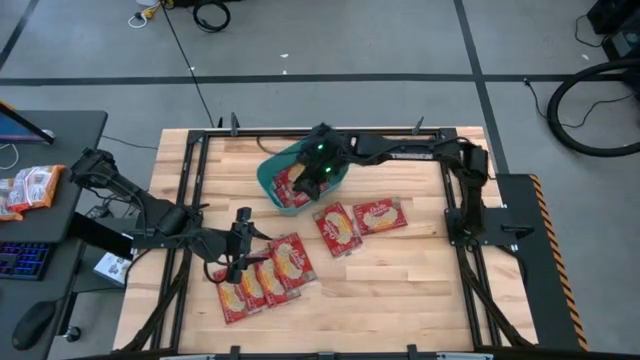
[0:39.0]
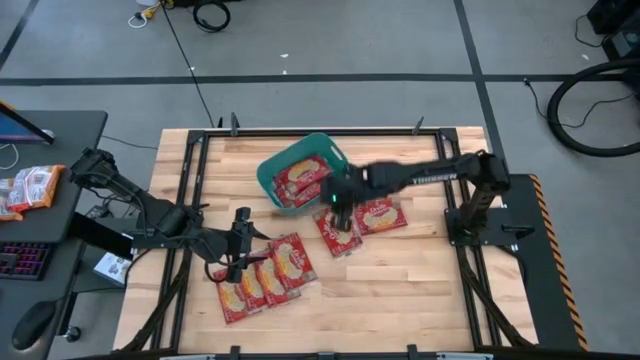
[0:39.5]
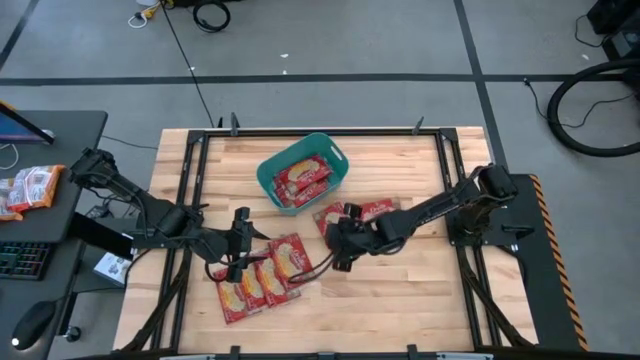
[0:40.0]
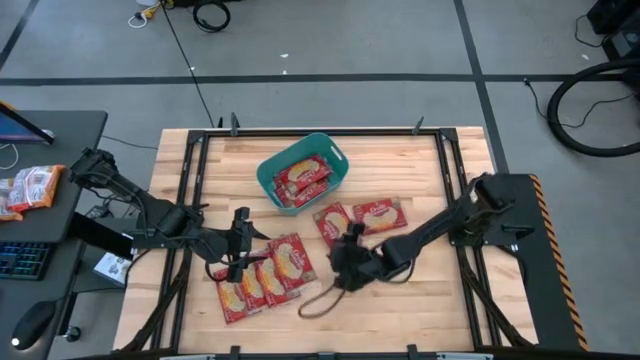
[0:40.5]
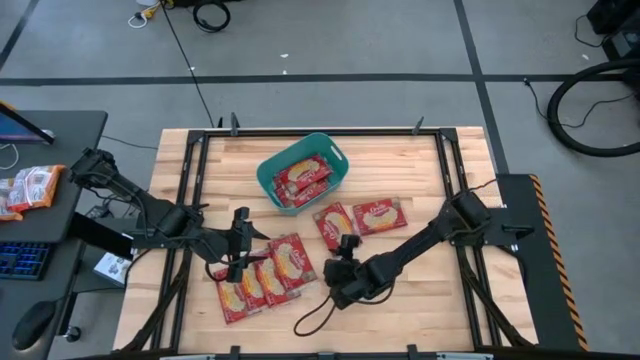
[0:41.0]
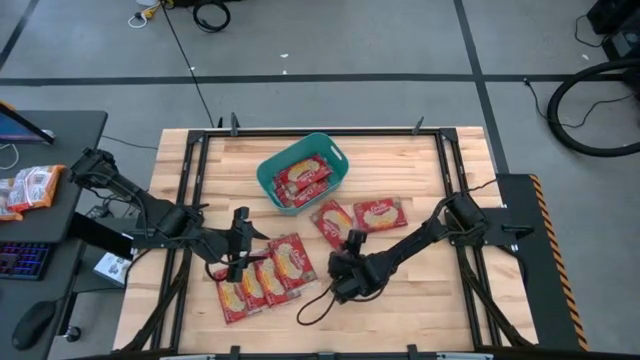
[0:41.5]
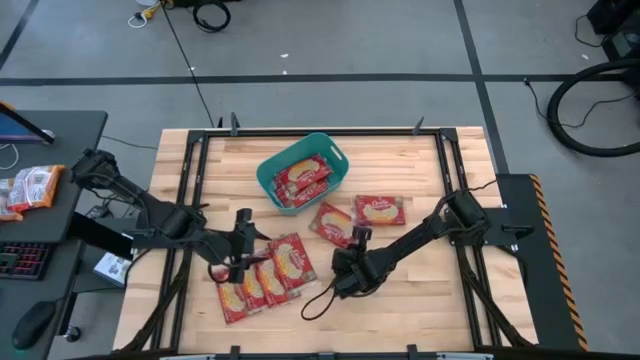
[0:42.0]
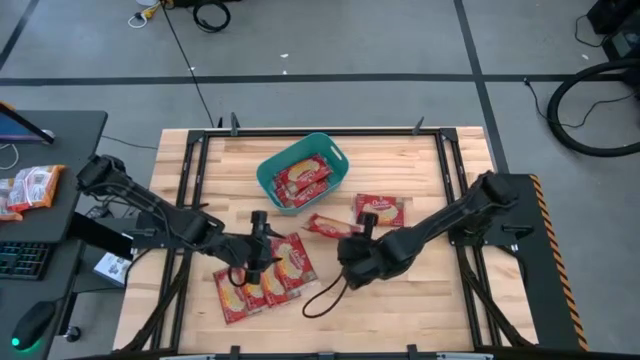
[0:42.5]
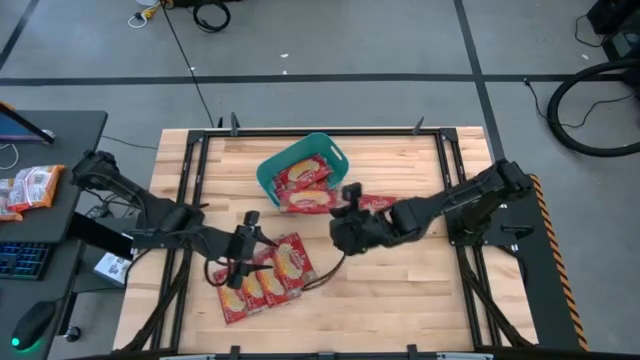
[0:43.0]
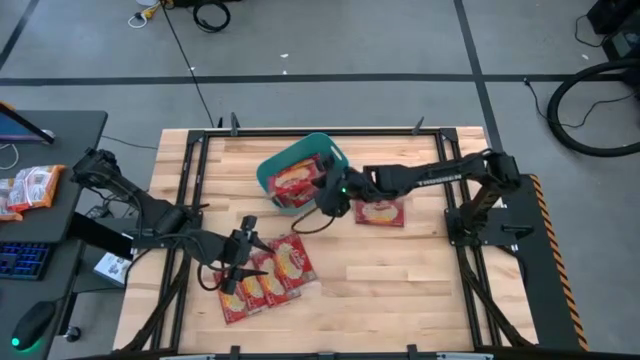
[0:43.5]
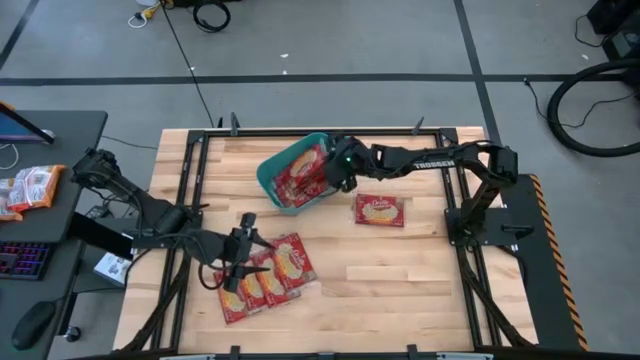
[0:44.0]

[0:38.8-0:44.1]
Task: Sort popcorn bags into baskets
Put the red popcorn bag into the green bin

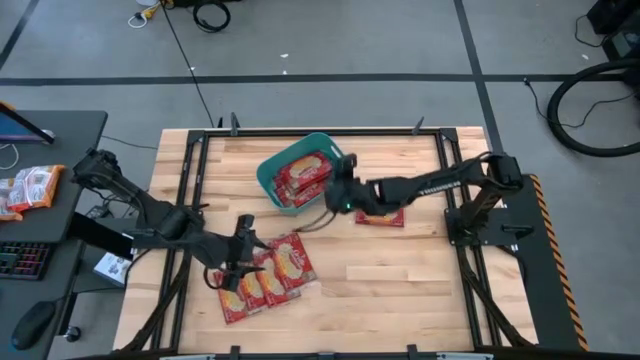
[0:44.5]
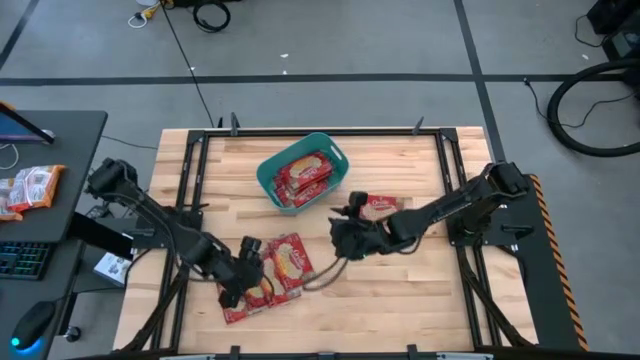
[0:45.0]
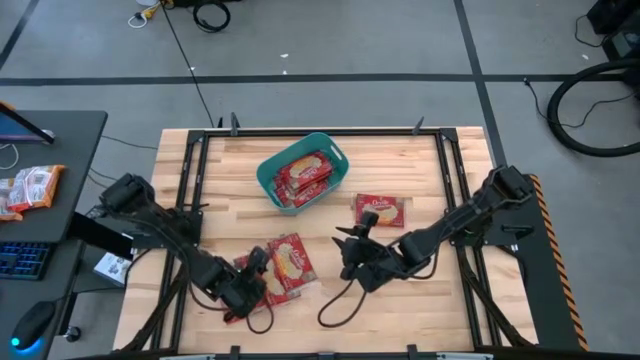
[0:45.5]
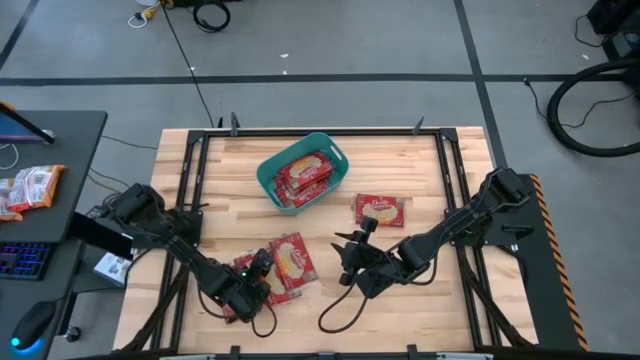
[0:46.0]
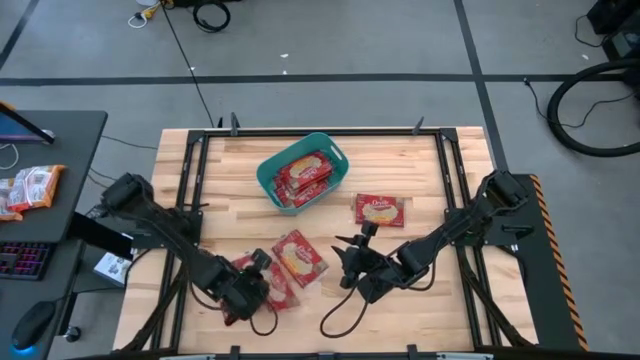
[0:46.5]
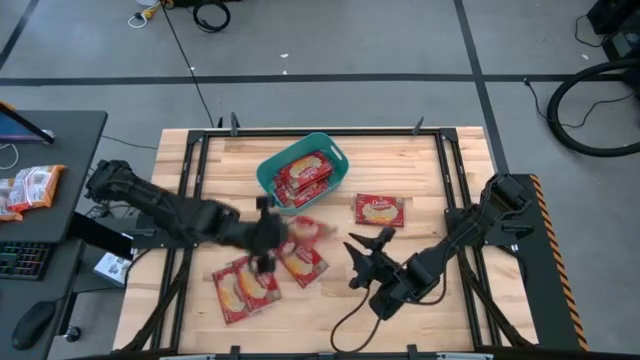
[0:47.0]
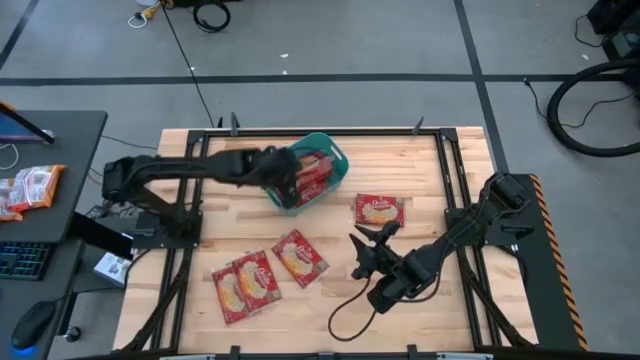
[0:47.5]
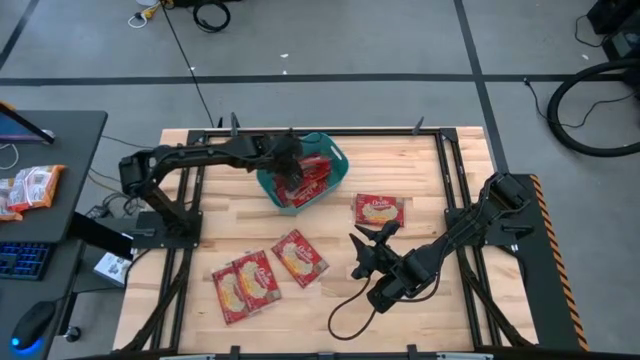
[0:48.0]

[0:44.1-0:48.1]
Put the red popcorn bag into the green bin

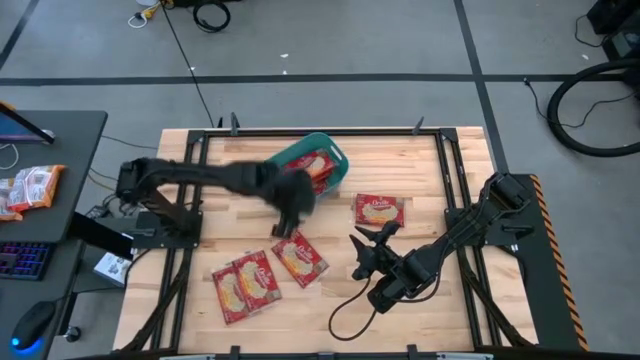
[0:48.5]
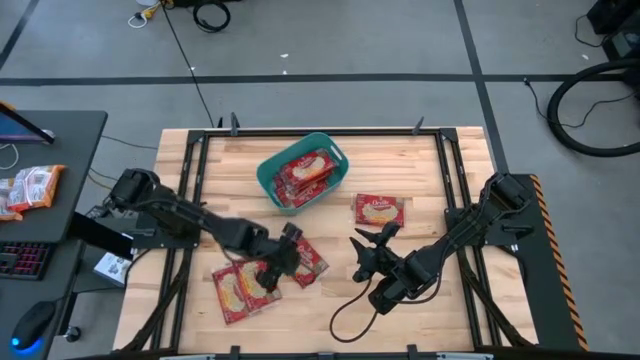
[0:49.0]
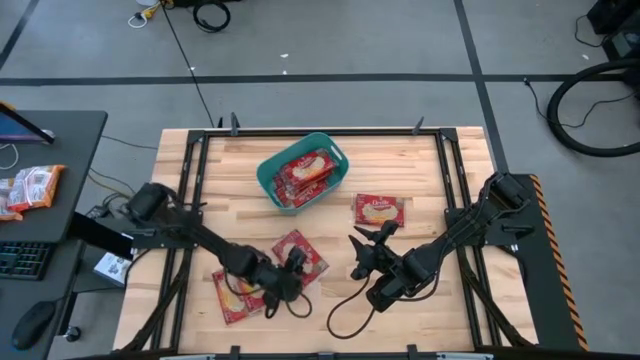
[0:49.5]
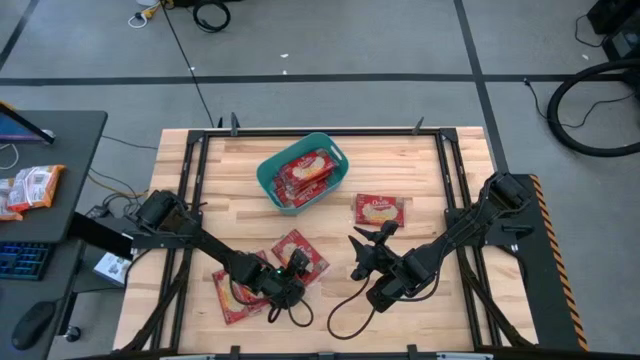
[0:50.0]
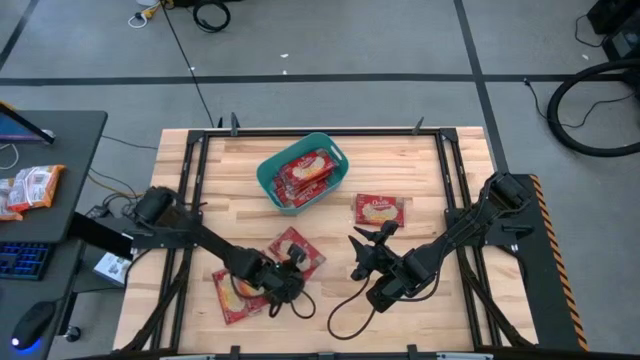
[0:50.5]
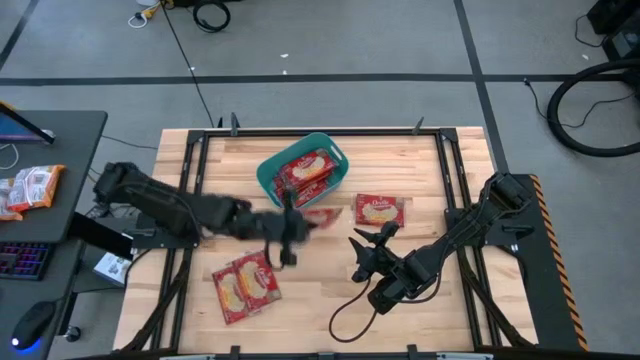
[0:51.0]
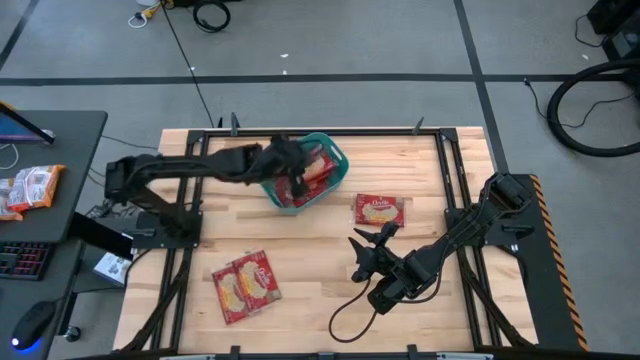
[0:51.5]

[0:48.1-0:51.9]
Put the red popcorn bag into the green bin

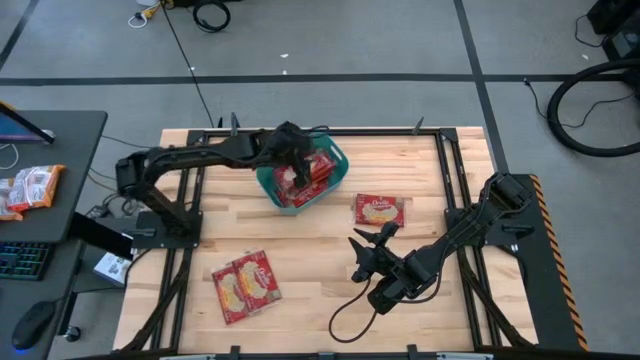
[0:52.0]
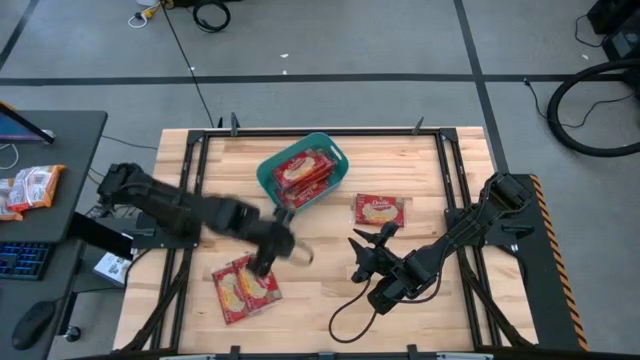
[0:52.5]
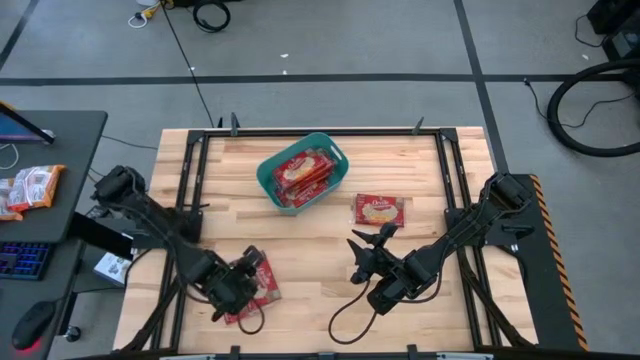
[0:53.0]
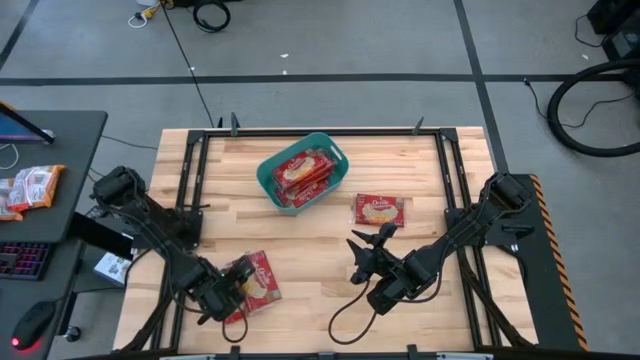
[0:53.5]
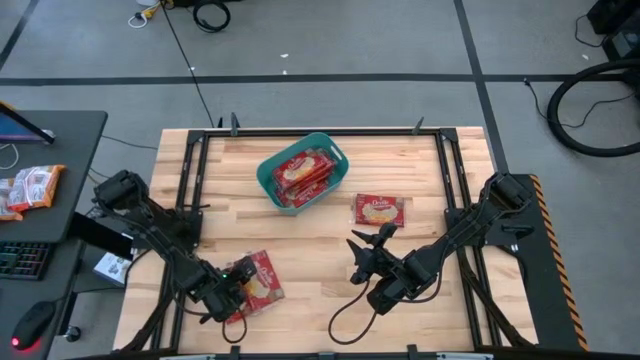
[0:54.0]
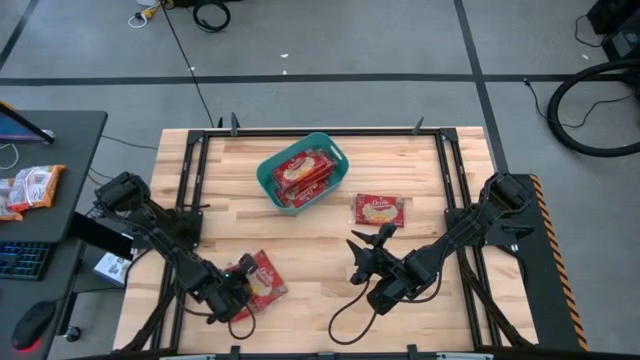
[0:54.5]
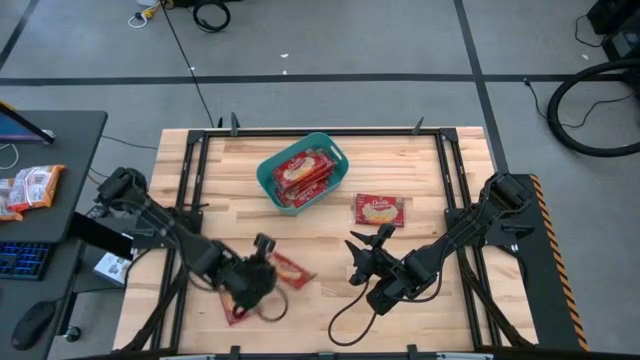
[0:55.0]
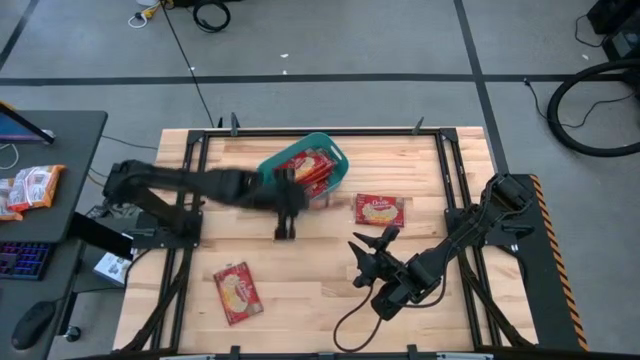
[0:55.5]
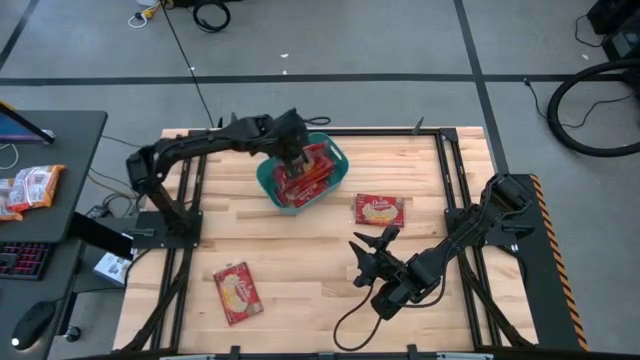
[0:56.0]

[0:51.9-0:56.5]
Put the red popcorn bag into the green bin

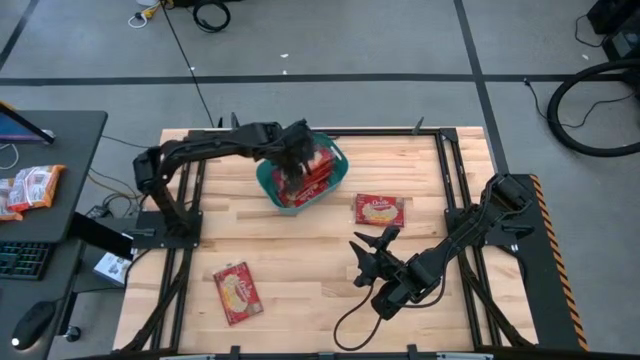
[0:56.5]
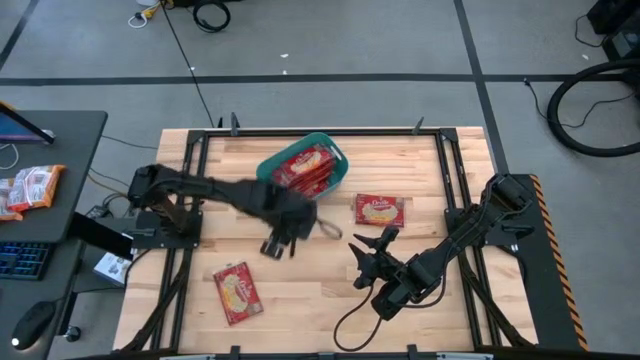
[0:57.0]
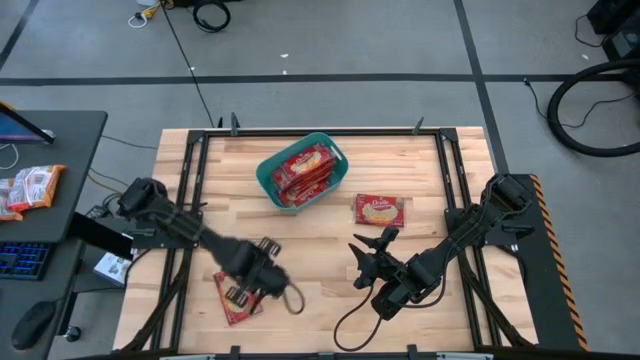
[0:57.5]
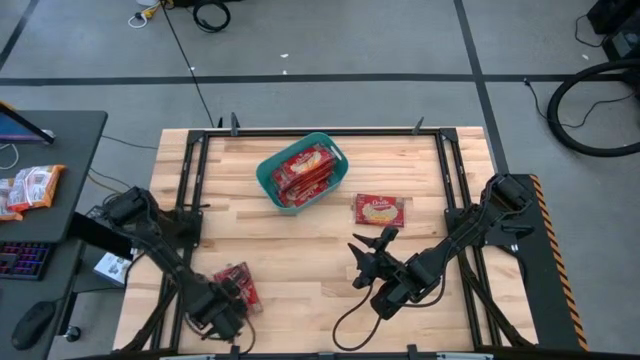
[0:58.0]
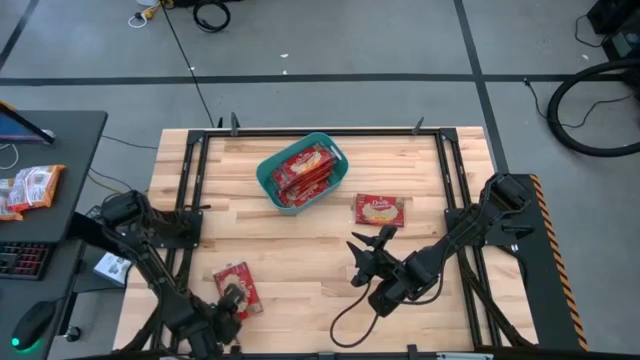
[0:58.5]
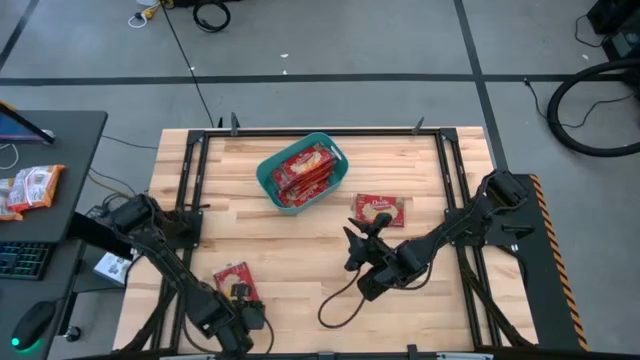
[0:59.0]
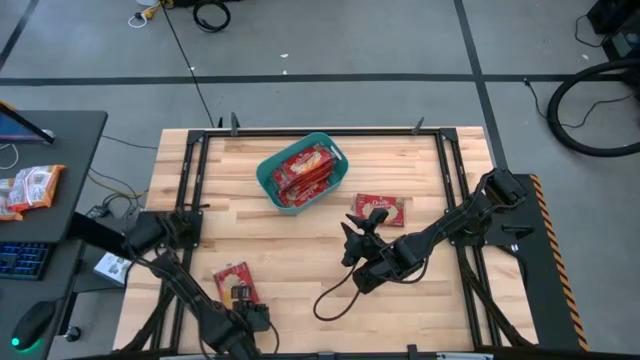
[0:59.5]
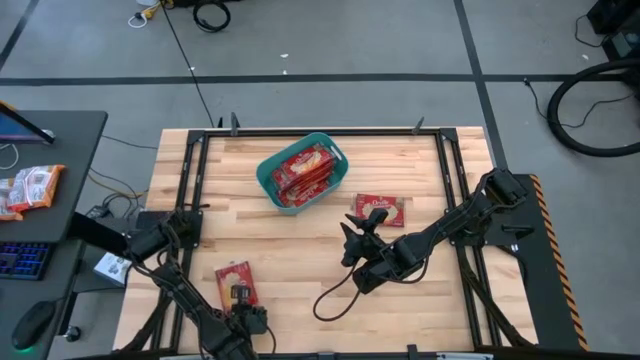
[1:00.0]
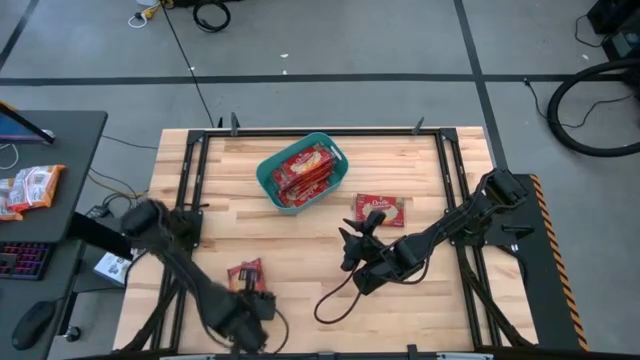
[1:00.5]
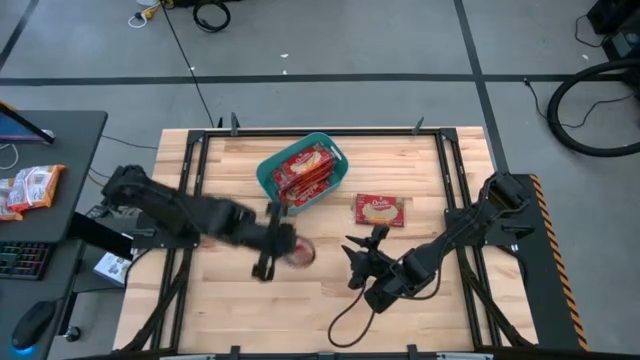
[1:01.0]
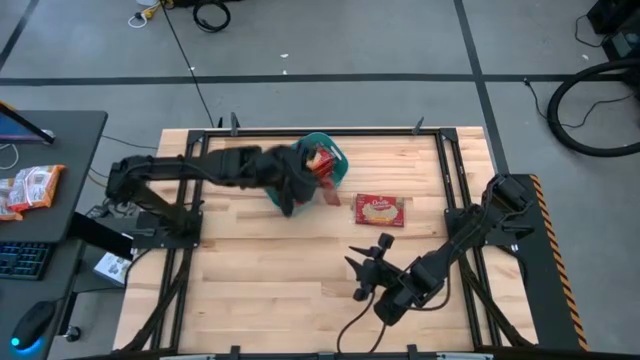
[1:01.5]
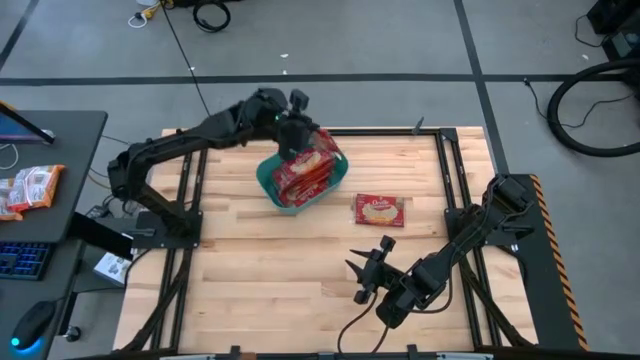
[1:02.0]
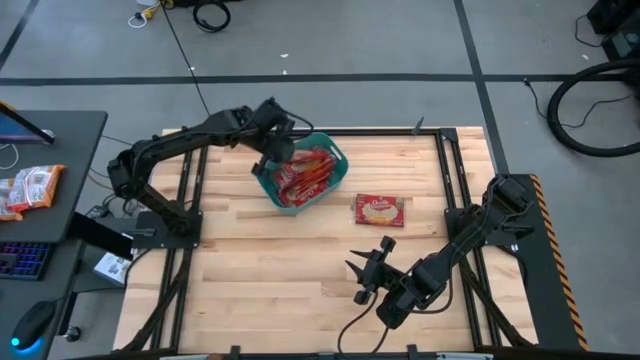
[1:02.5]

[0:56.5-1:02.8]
Put the red popcorn bag into the green bin
